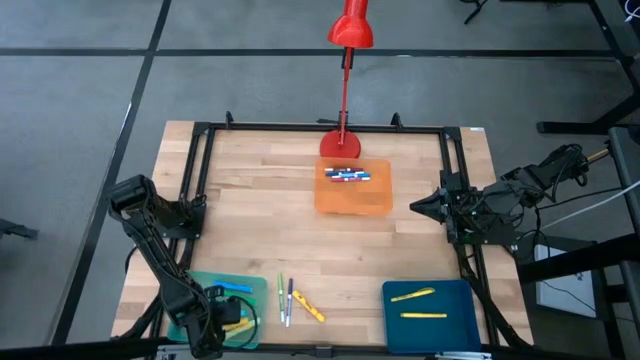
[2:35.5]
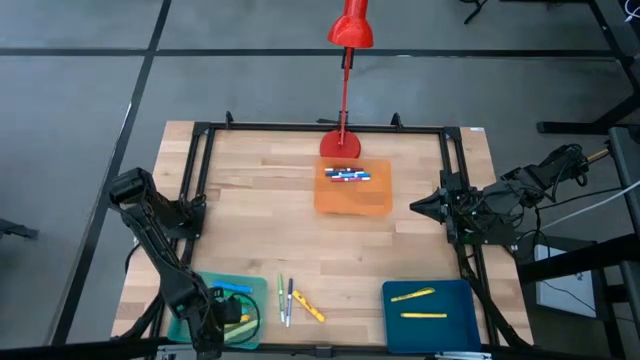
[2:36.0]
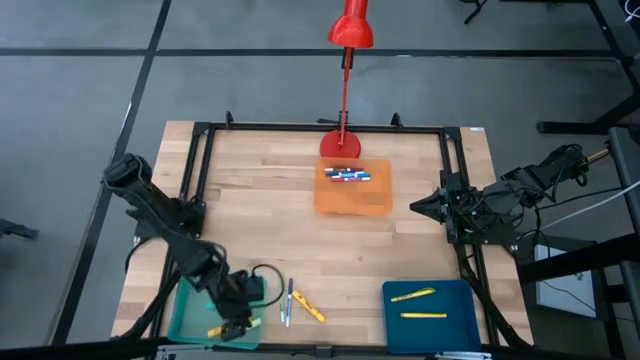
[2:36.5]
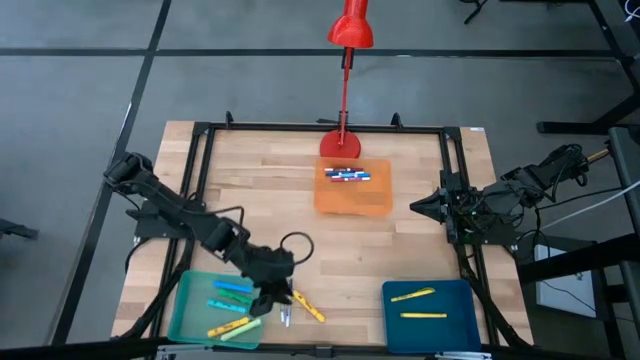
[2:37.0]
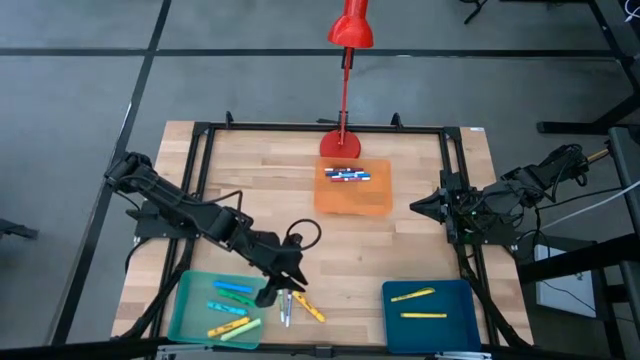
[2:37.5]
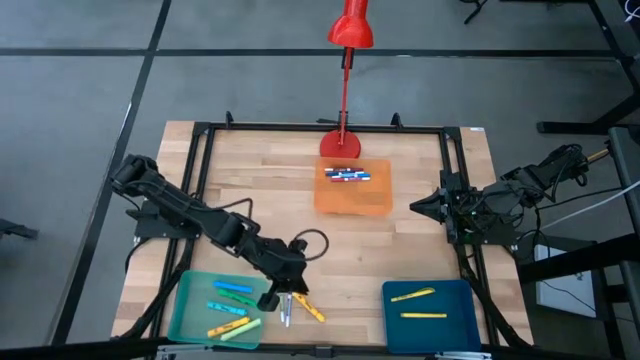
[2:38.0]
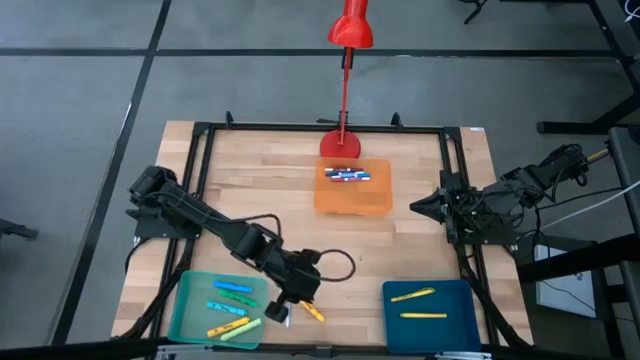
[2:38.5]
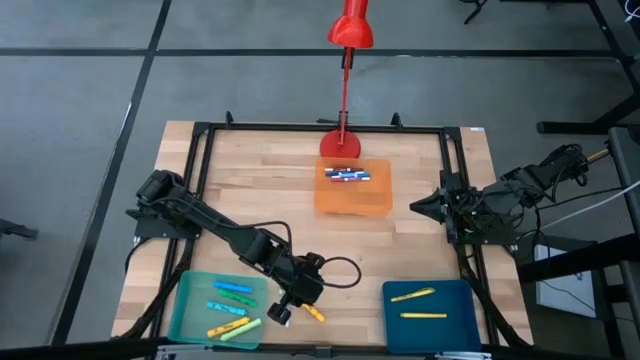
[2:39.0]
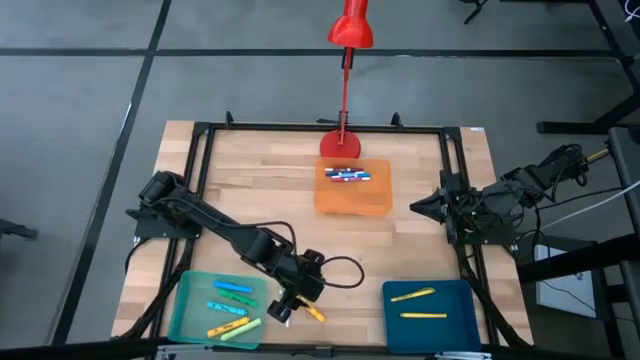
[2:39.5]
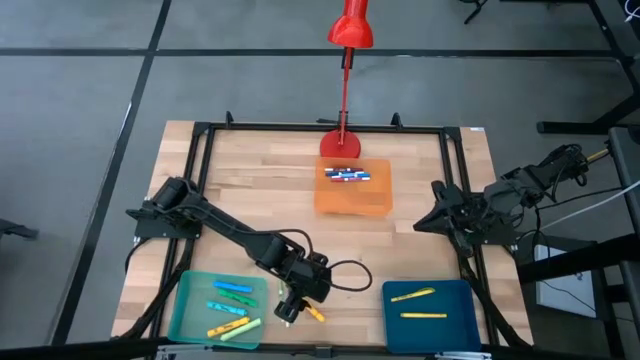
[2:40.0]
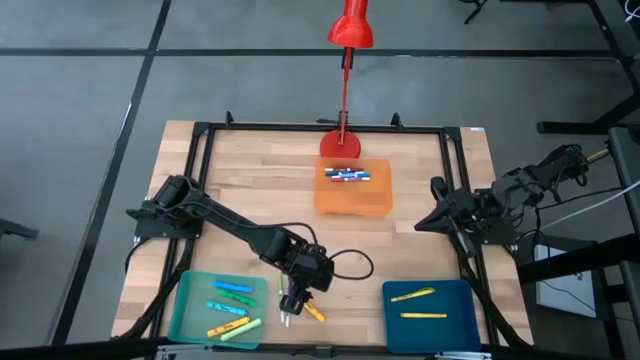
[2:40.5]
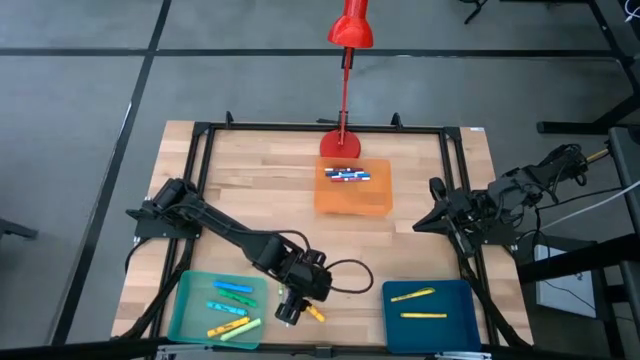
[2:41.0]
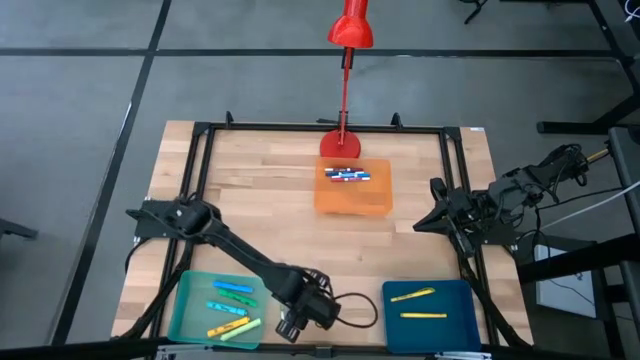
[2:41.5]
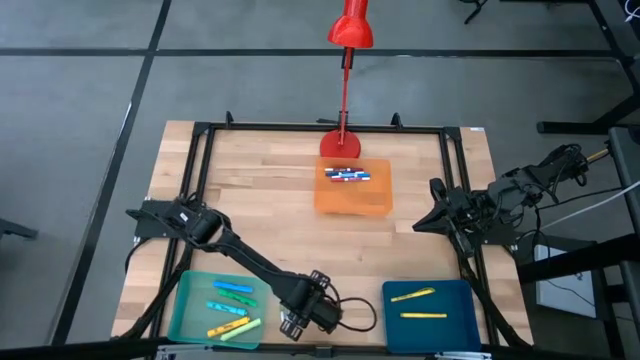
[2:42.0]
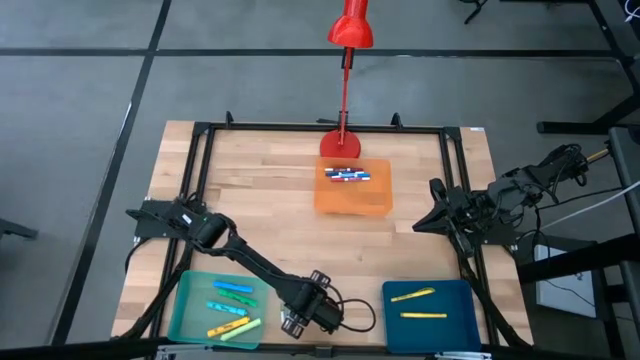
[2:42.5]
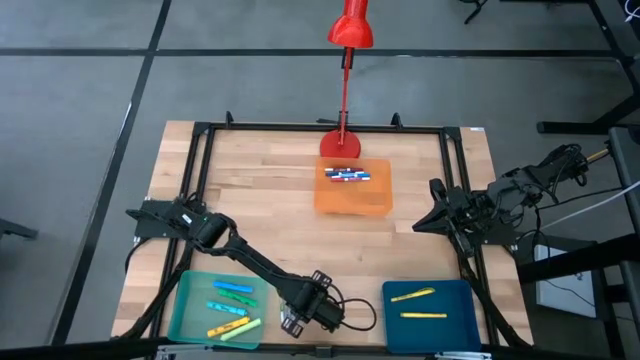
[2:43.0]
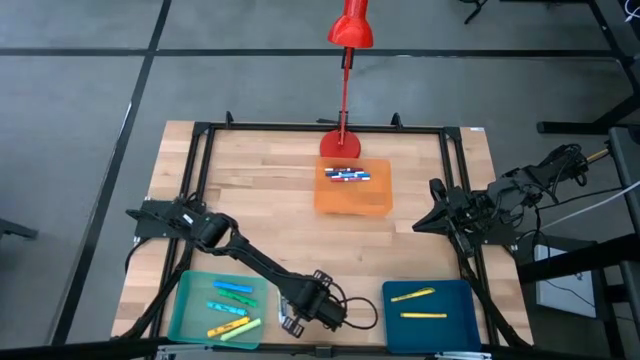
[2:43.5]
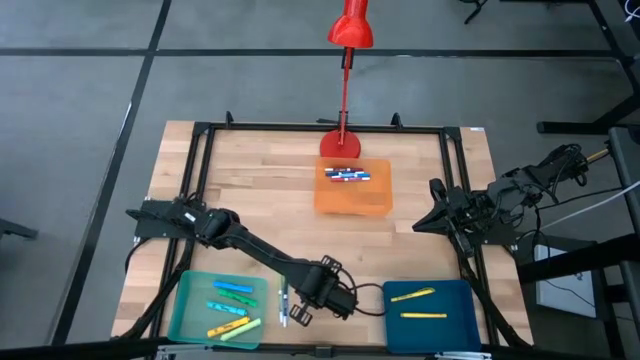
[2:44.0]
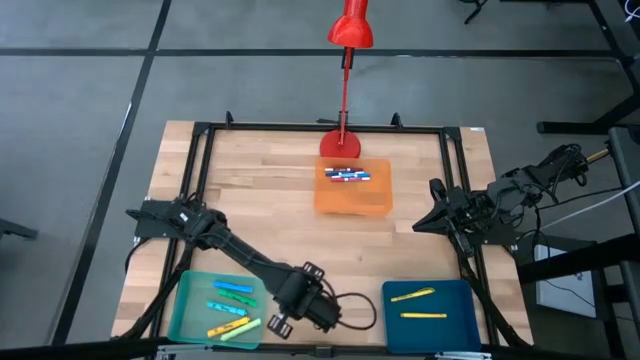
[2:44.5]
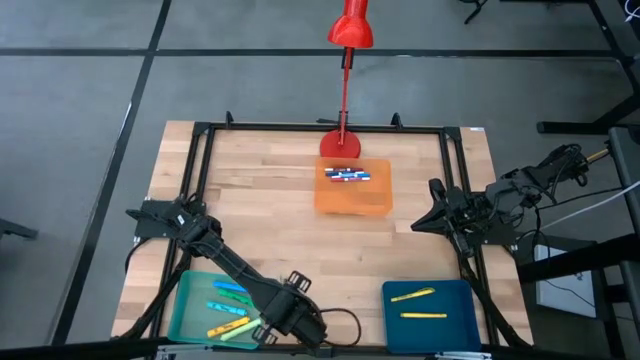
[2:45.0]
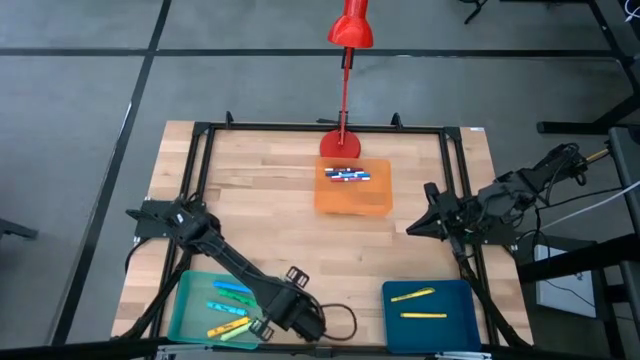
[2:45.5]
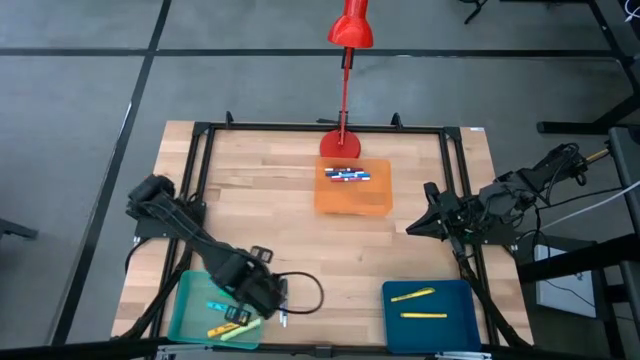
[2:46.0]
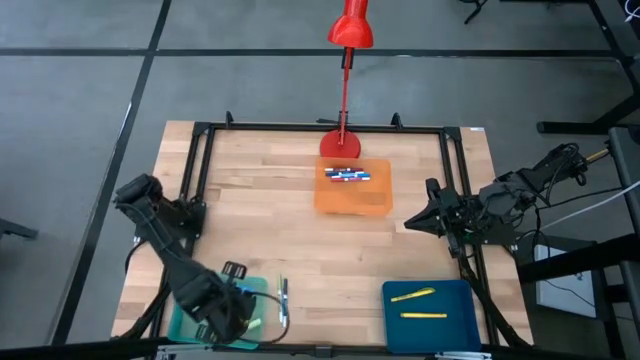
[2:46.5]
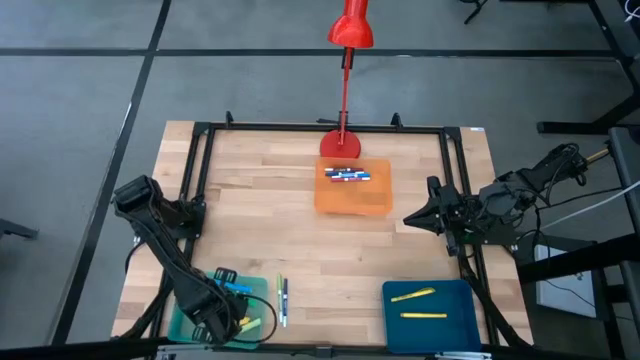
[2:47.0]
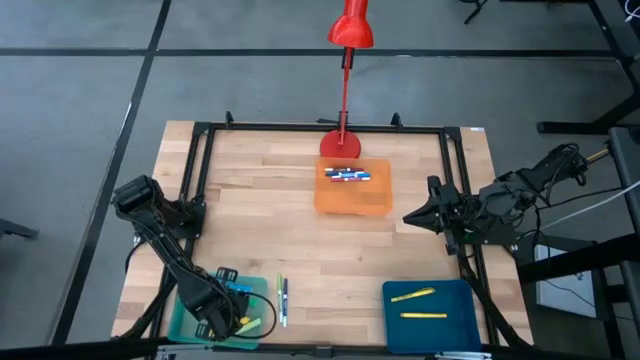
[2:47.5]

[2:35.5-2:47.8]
Task: Pick & Place Markers
Put the yellow highlighter pen into the green bin

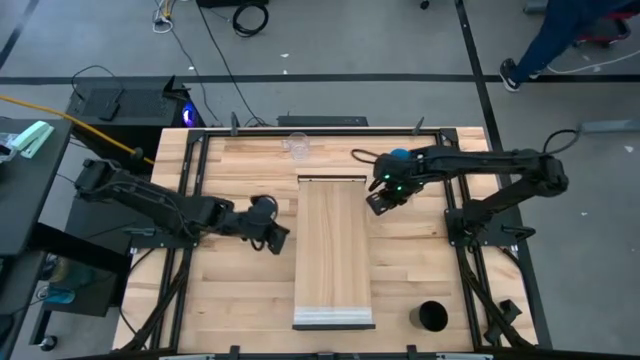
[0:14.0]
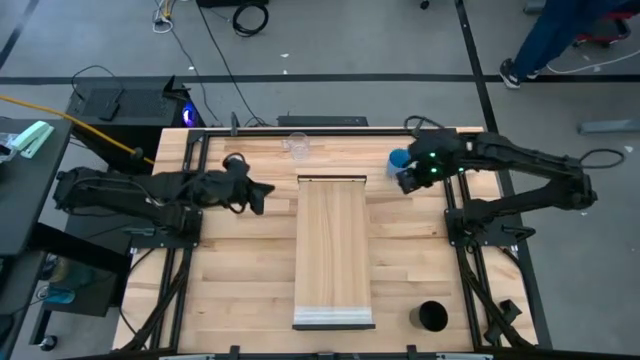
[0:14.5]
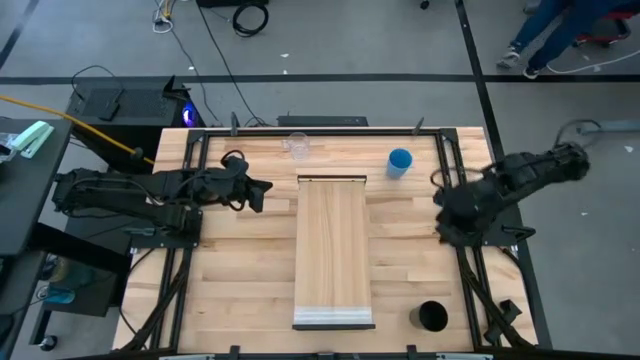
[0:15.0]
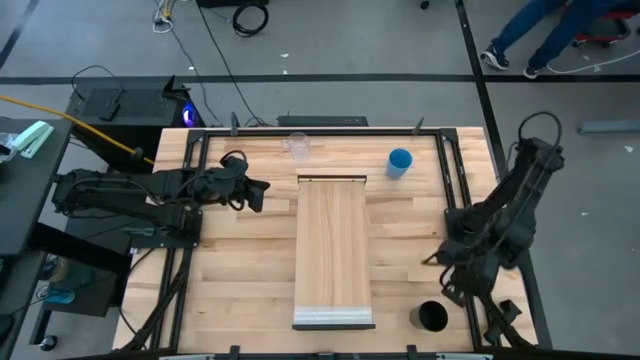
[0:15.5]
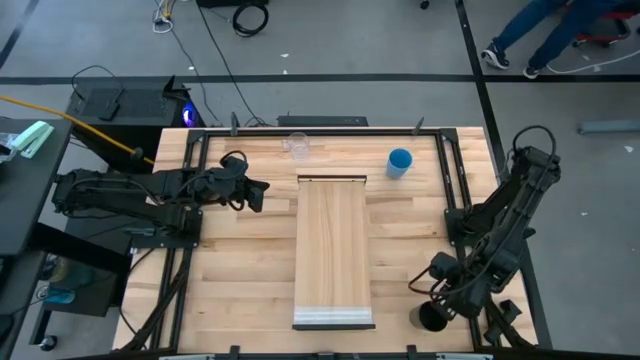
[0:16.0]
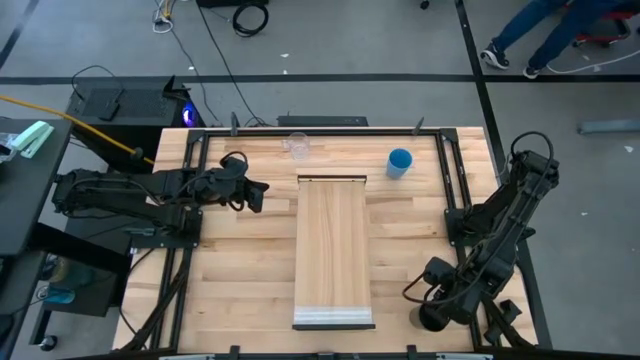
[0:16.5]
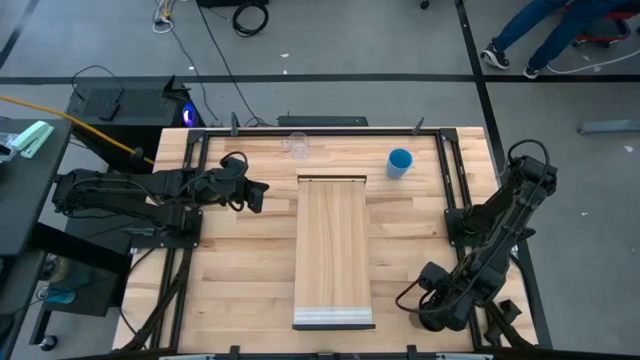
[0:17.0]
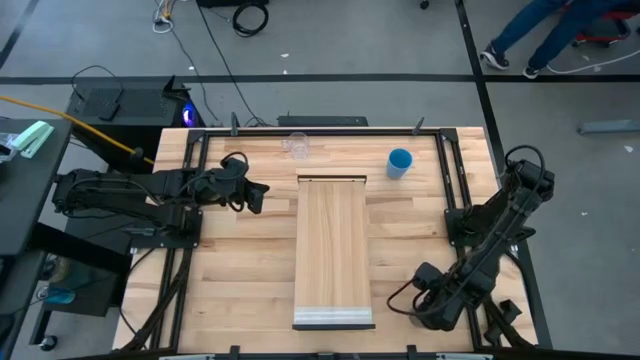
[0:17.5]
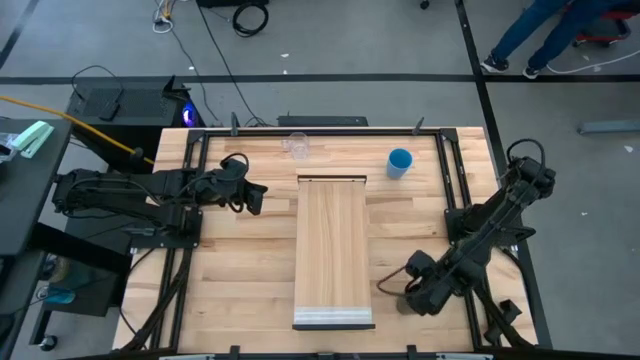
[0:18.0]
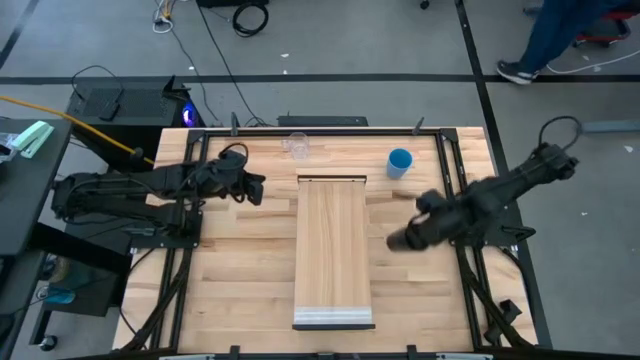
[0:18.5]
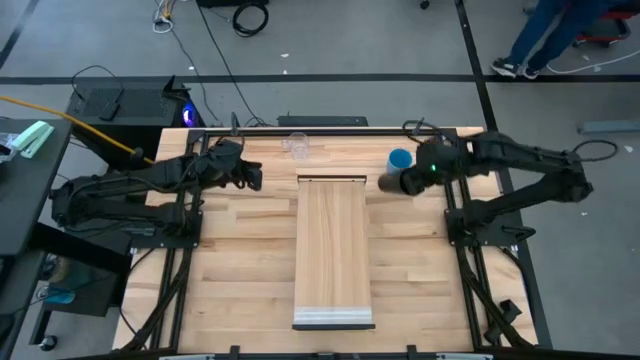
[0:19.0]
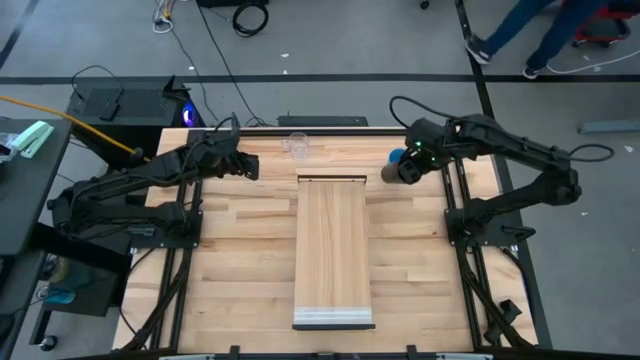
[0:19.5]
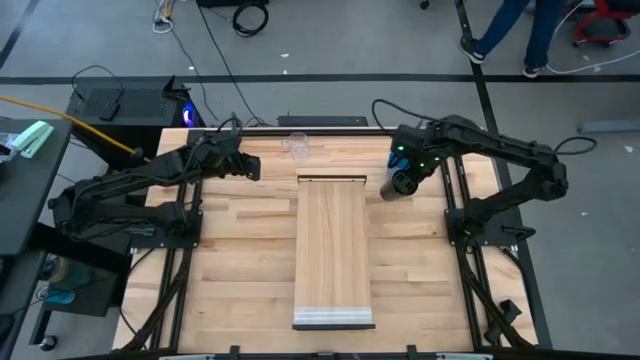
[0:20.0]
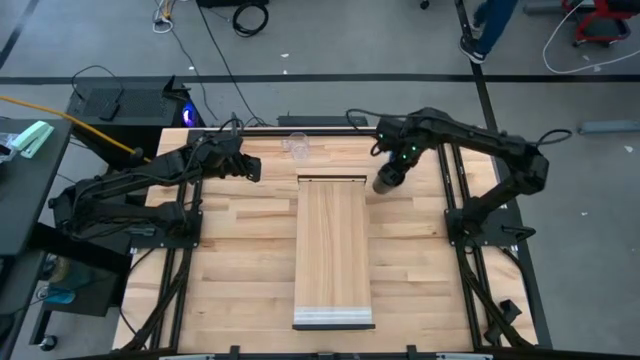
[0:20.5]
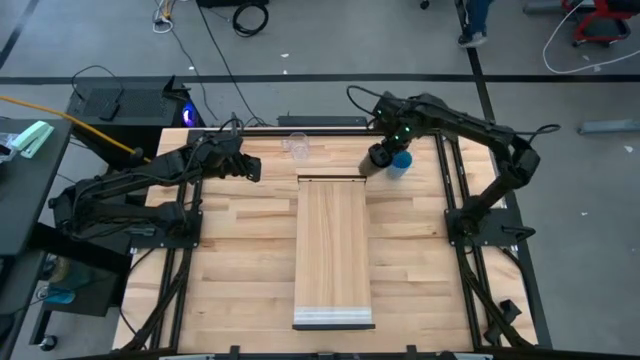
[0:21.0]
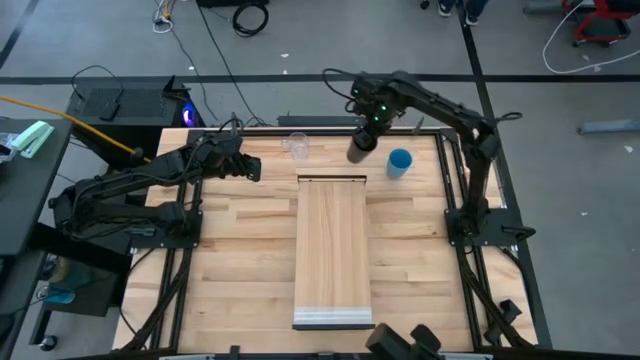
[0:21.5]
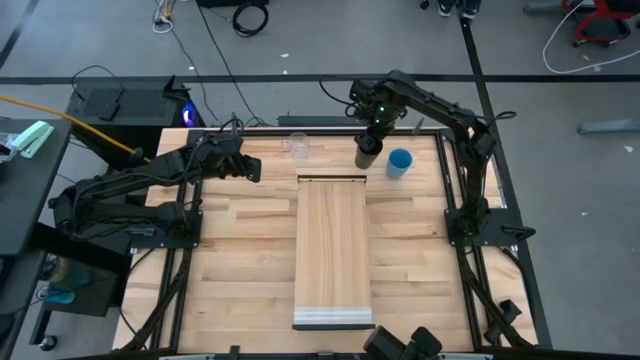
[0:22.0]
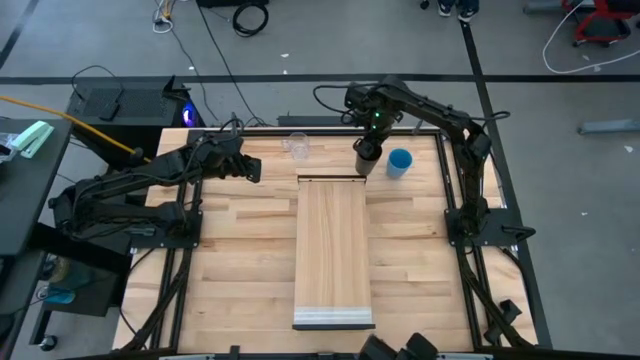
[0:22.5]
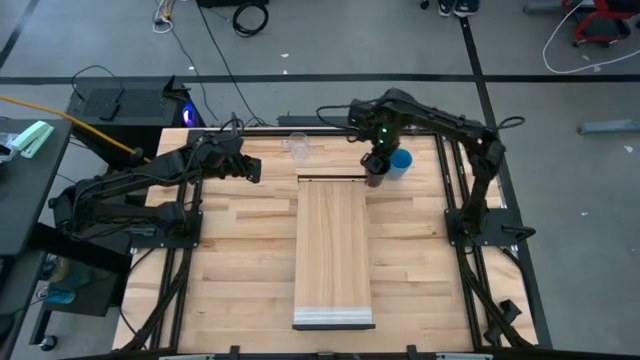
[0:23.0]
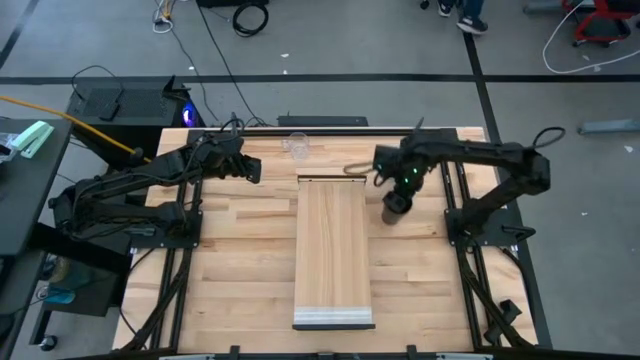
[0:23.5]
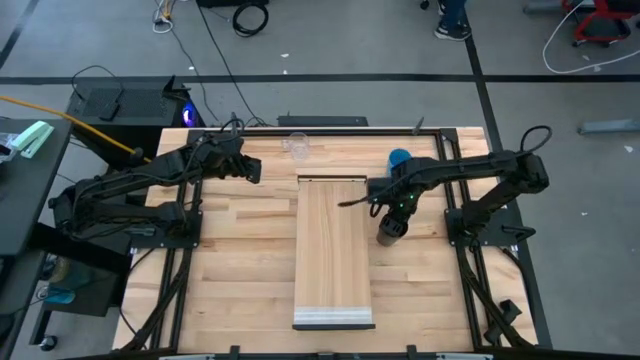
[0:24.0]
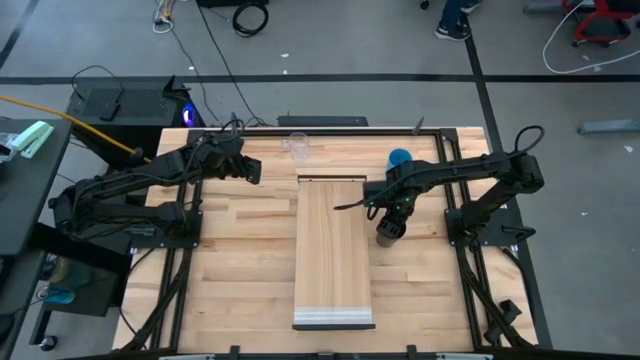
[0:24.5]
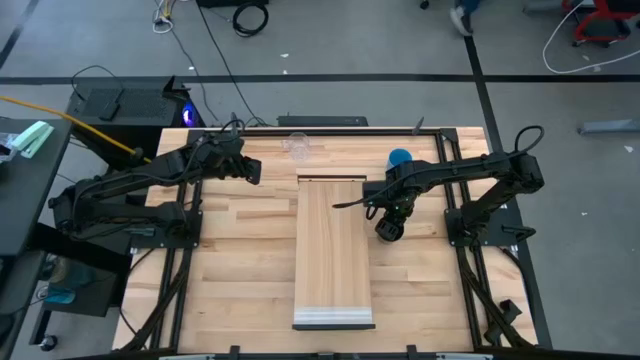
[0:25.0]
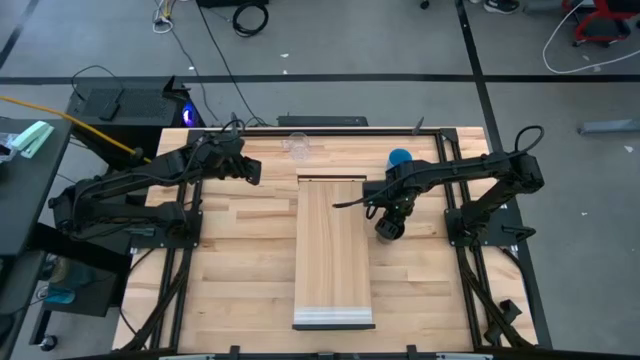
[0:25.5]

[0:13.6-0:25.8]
Task: Stack small to large cups/mugs on shelf
Move the black cup to the right of the shelf
